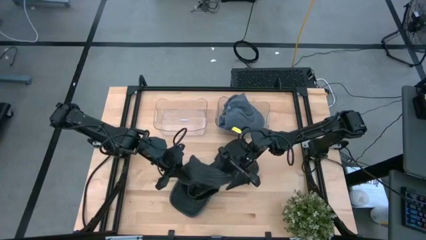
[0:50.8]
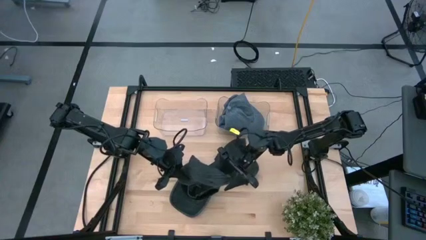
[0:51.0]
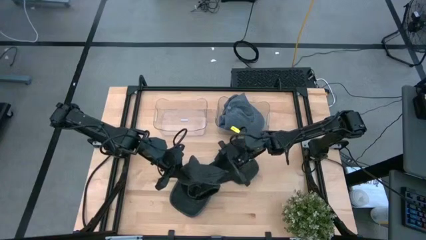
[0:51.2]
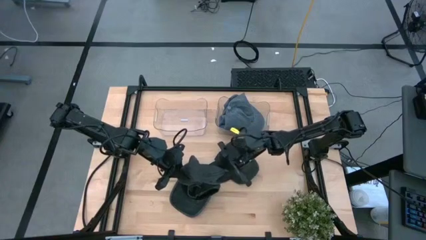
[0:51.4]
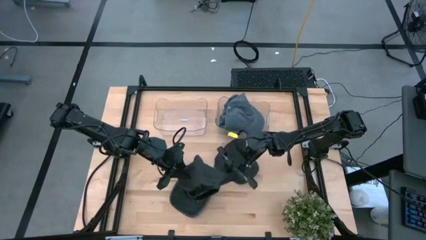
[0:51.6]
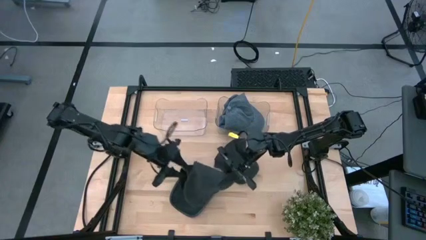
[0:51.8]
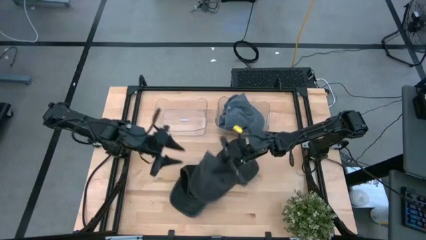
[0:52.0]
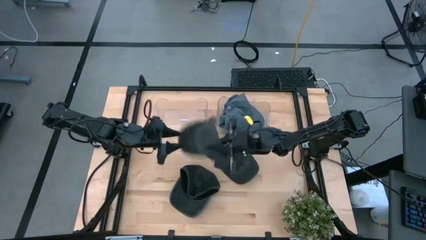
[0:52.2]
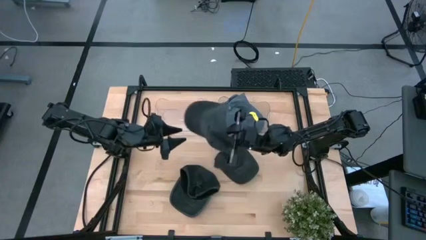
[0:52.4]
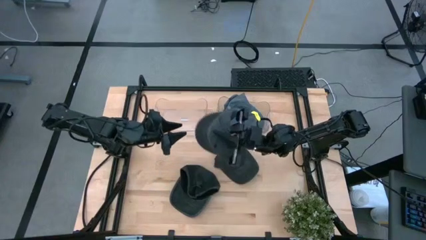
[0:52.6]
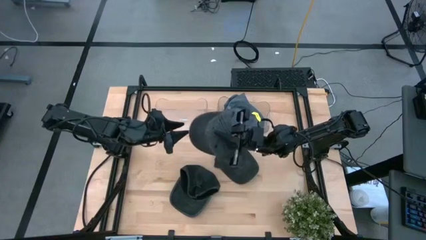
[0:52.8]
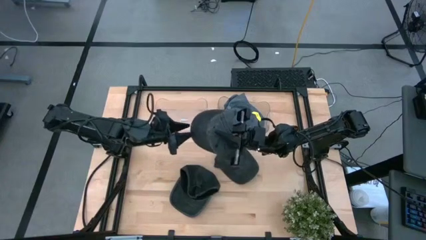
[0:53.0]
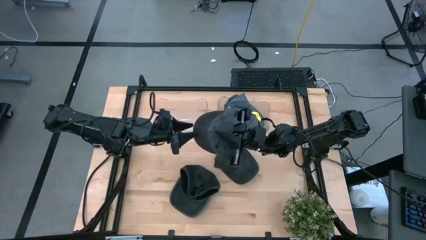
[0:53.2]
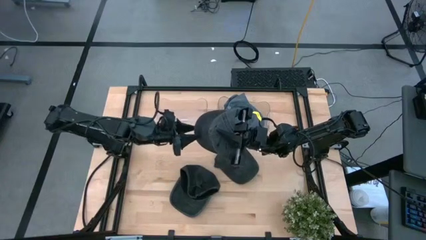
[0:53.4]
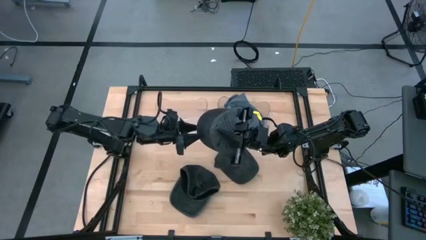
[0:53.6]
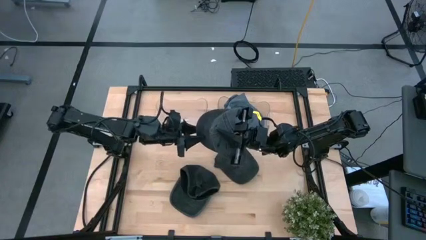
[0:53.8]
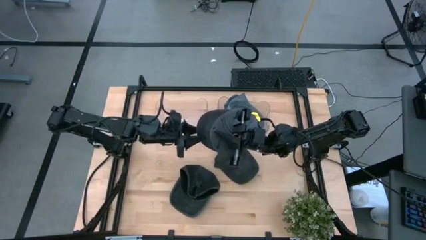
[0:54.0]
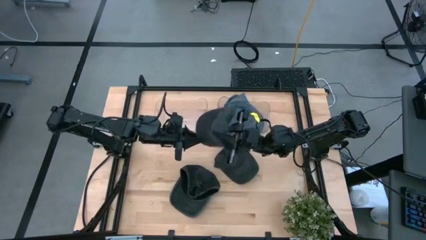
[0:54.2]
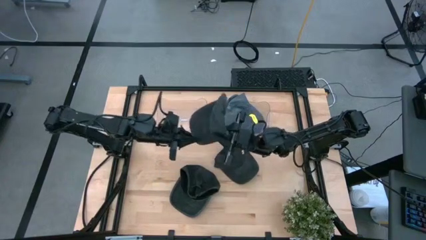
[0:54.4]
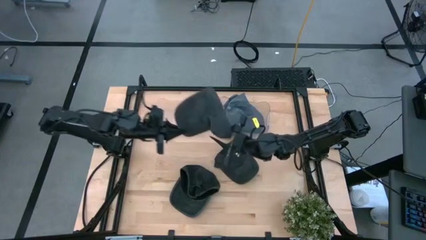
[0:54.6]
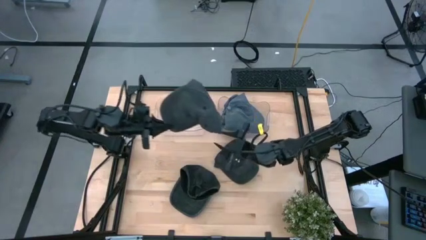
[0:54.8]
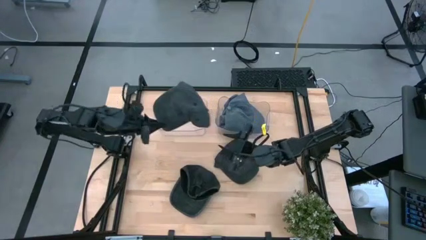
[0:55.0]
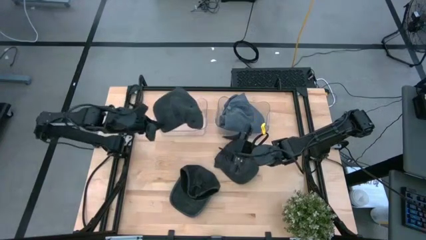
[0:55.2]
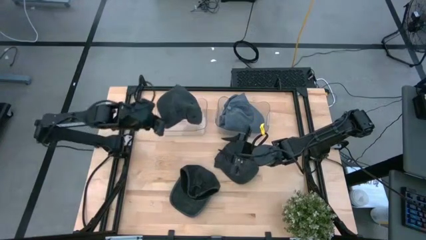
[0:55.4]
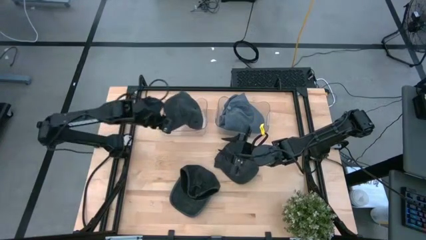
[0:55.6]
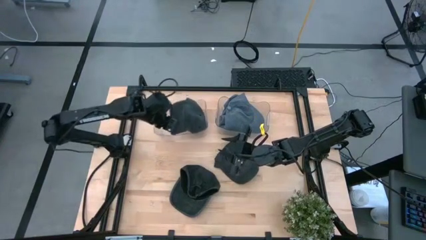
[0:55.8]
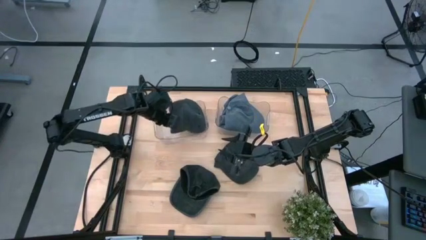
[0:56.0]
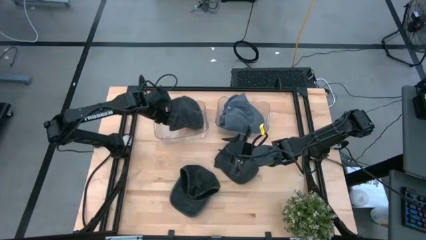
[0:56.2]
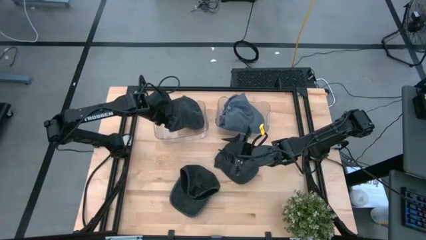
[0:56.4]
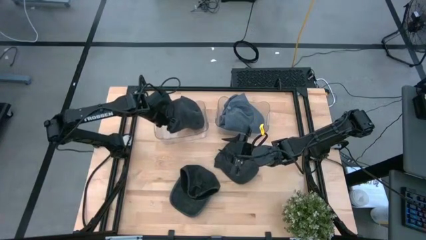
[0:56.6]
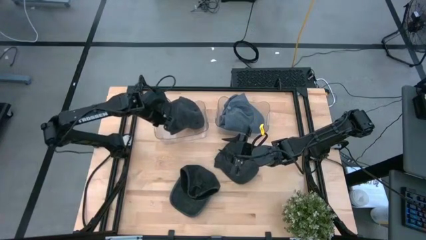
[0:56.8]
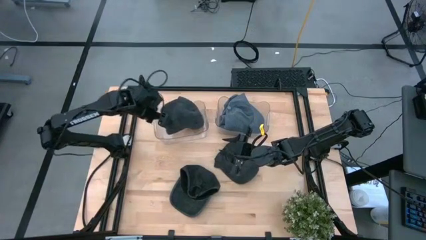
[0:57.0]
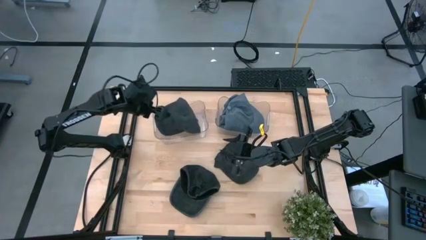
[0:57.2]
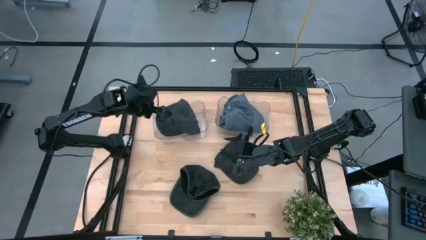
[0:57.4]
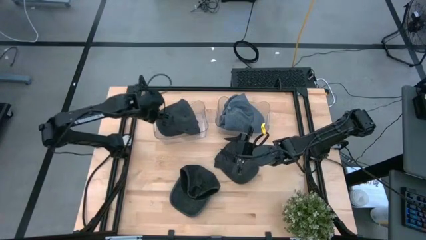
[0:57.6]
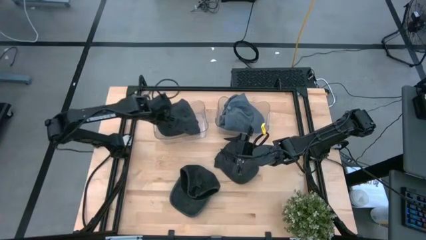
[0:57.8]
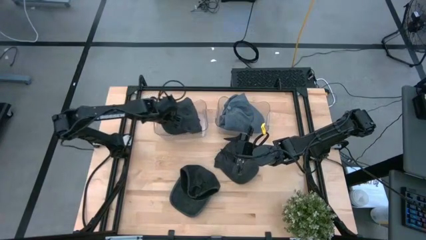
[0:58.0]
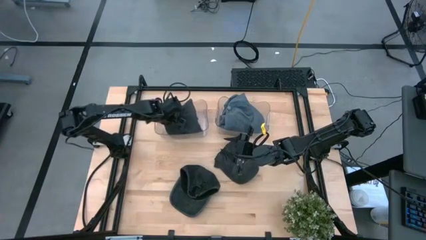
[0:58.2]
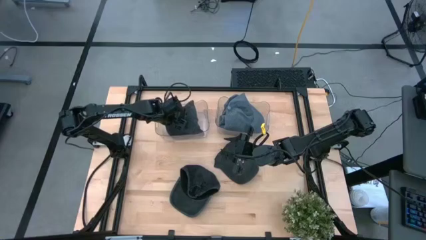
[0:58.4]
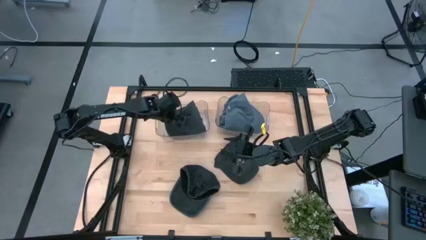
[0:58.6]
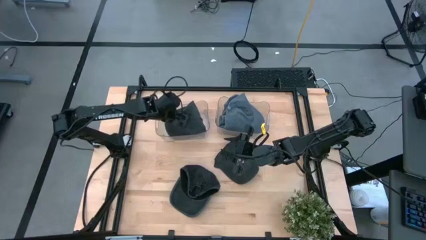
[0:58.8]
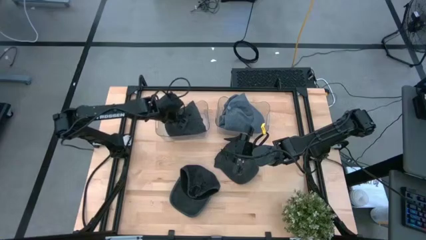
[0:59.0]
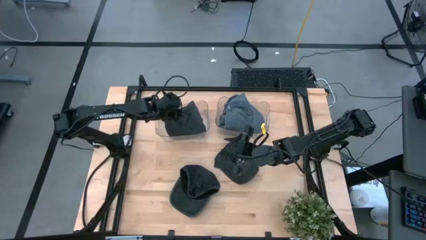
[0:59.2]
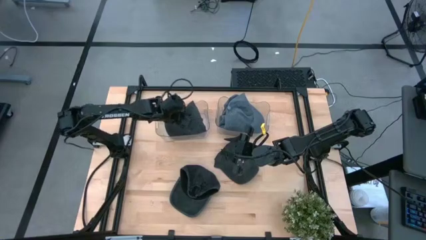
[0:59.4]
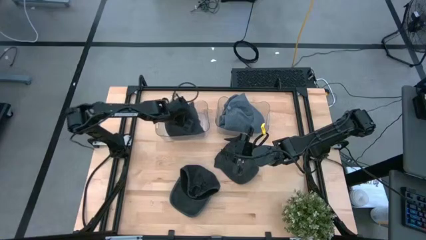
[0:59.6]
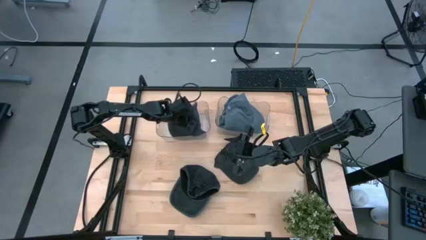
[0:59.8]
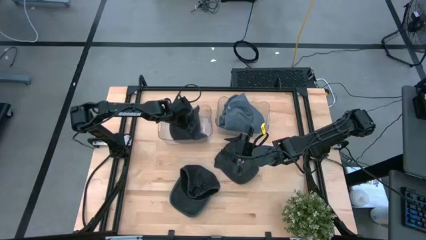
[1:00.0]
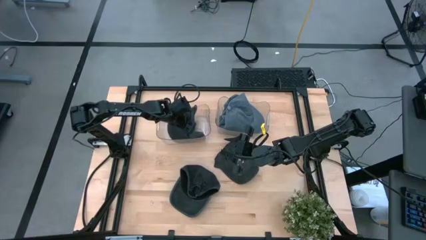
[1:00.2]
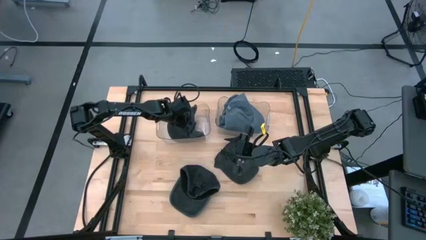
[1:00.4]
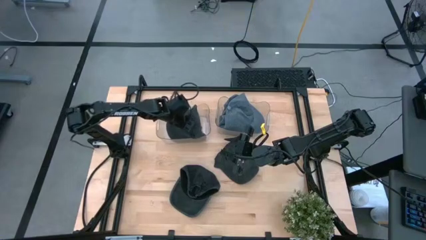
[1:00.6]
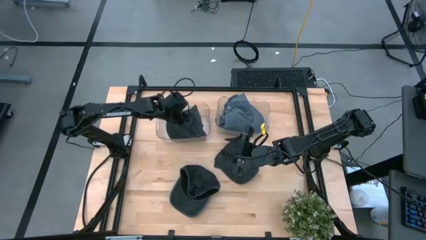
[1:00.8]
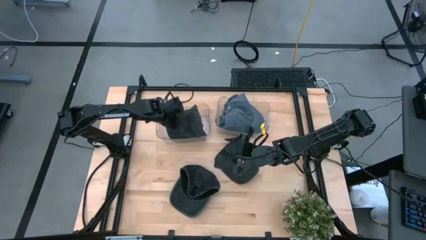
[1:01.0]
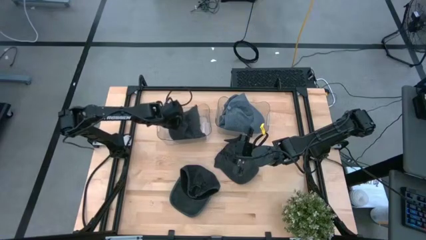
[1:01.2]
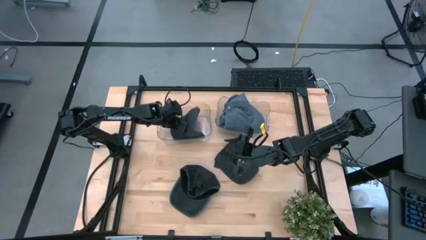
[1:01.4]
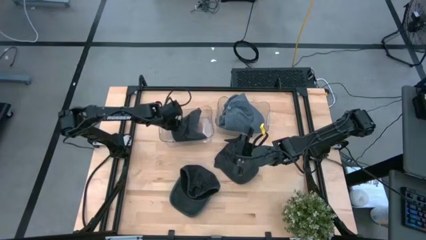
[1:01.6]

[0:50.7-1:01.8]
Task: Pick & Place hat
Put the bottom right black cap into the left transparent bin

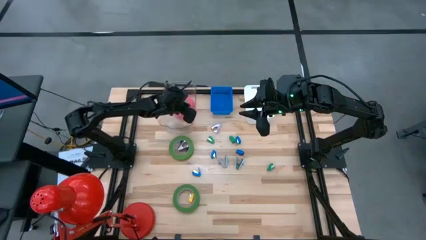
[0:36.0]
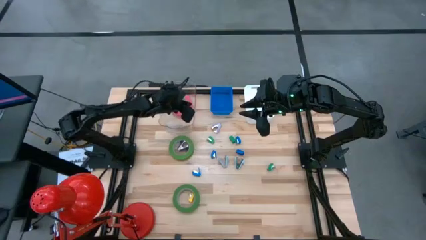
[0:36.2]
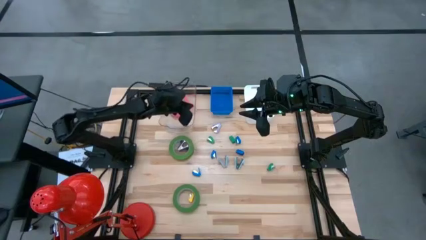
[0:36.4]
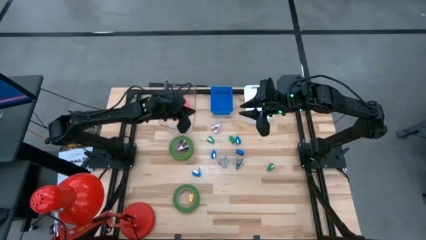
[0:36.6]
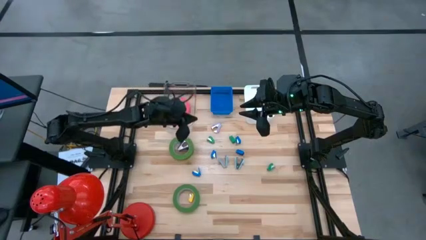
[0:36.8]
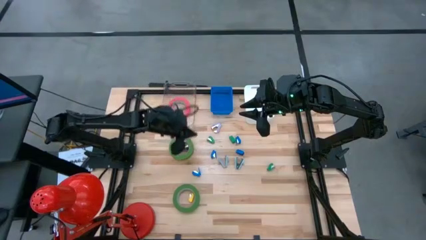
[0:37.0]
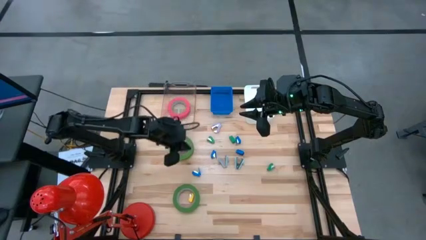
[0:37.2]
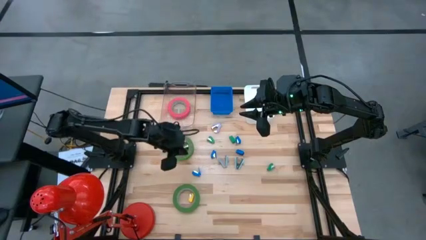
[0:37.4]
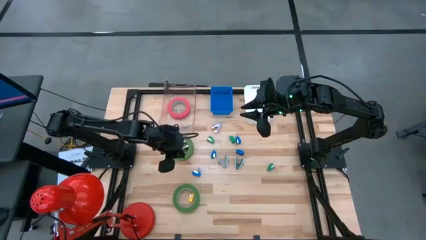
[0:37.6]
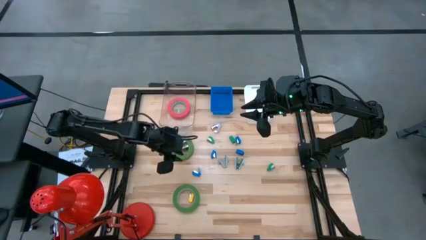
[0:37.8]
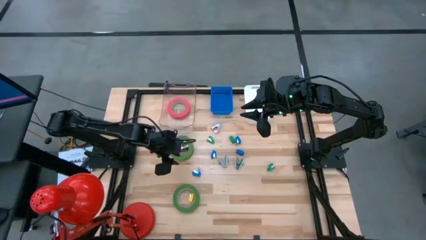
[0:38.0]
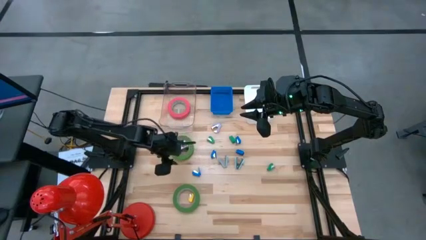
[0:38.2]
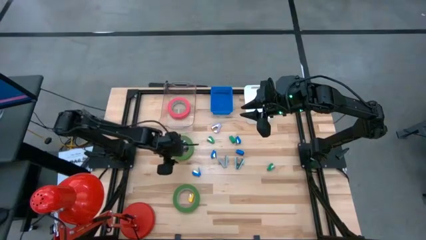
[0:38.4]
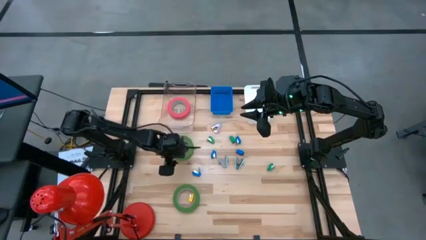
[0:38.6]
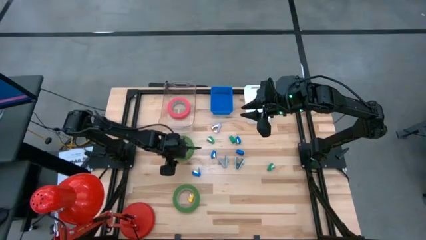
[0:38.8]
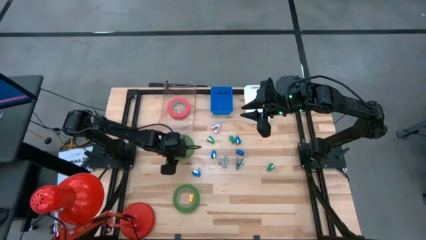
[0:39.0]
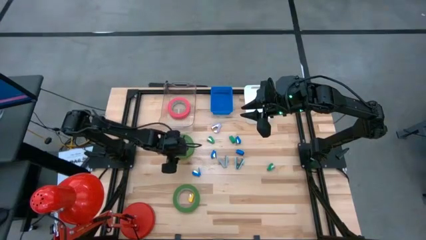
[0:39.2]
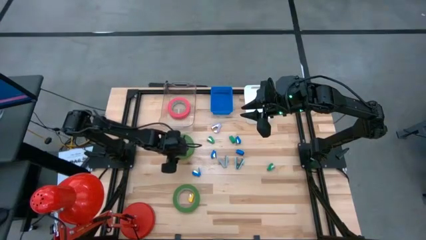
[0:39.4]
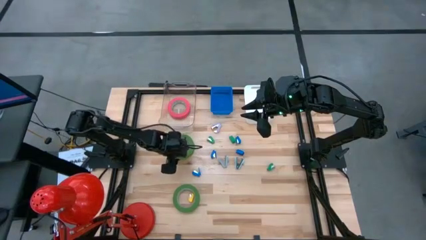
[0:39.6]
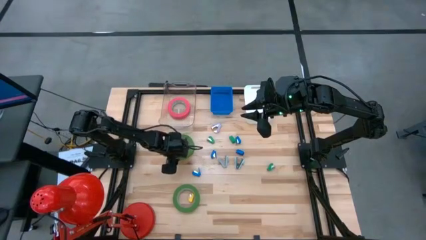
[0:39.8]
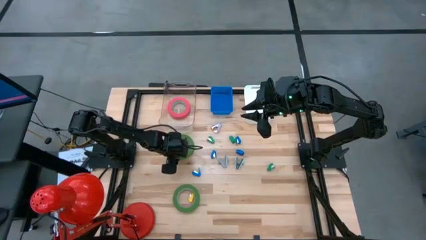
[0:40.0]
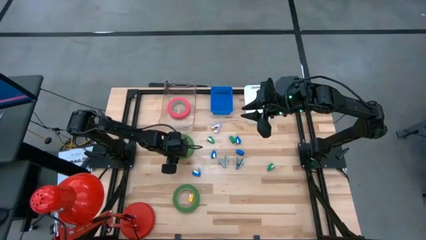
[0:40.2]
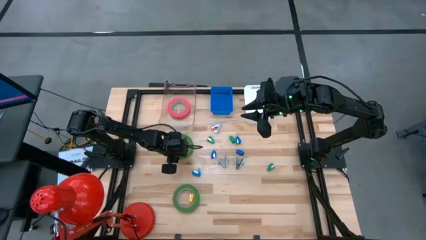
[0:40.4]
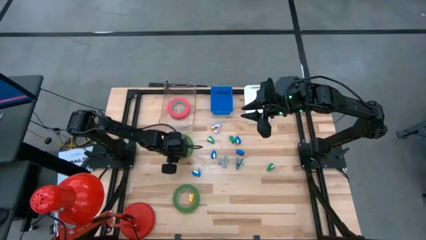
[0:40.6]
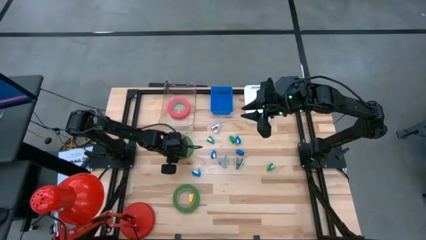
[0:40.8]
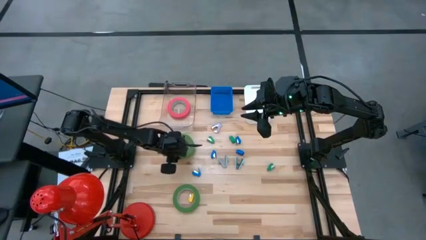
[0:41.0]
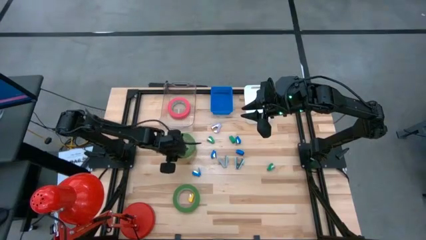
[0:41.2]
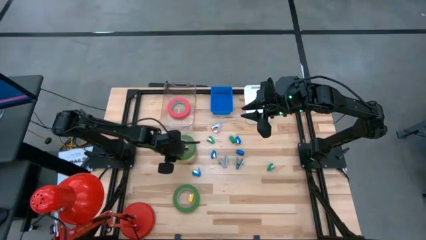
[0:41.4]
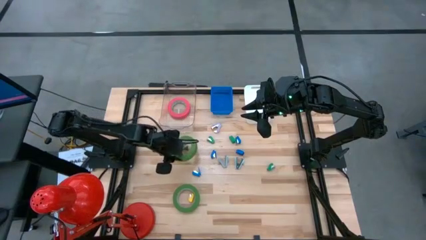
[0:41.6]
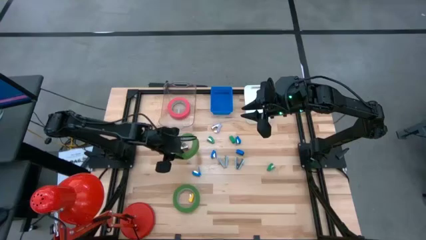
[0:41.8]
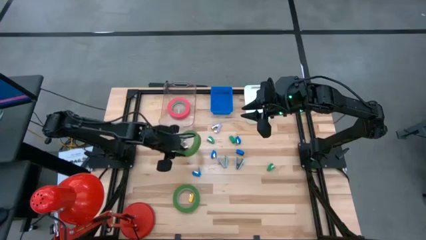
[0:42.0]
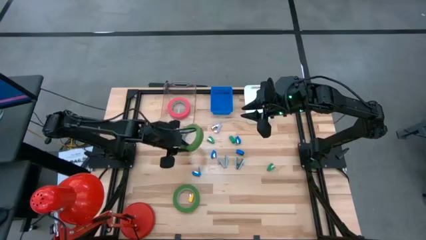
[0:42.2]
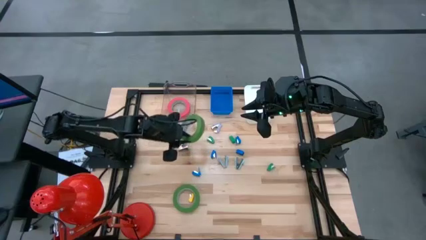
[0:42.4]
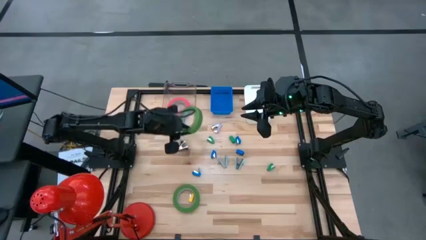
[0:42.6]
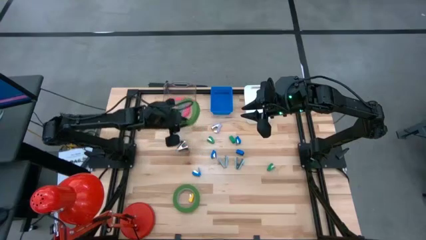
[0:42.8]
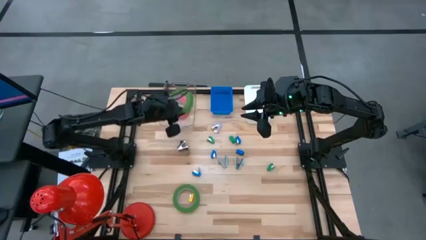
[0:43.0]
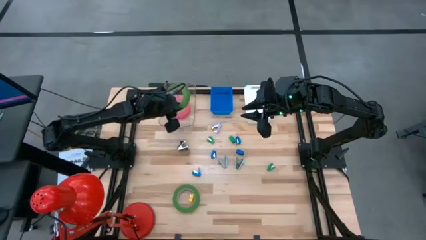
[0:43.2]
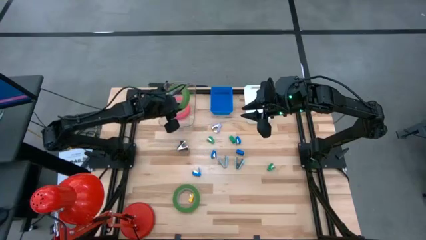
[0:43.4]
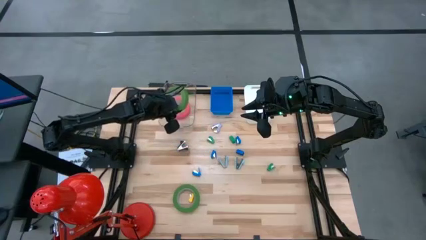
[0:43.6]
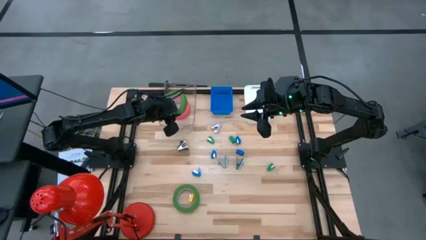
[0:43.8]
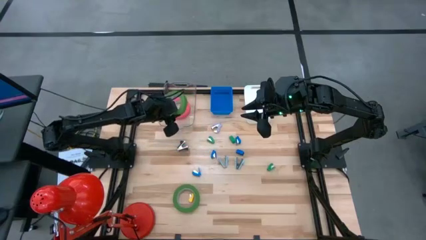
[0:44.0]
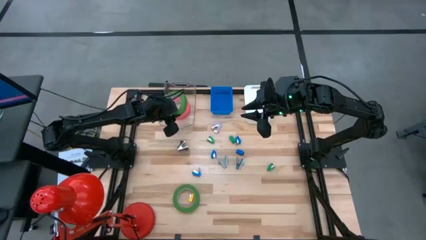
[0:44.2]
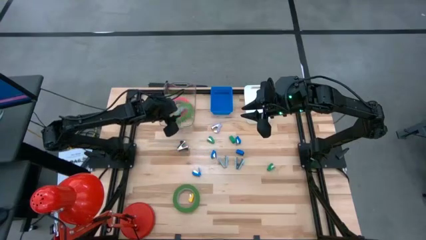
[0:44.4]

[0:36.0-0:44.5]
Task: Pick and place Stapler, Stapler remover, tape
Put the top green tape into the transparent bin
